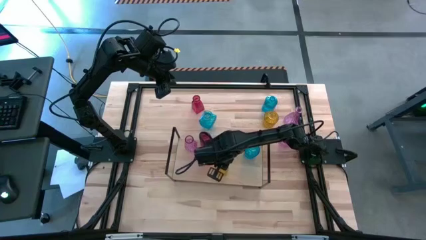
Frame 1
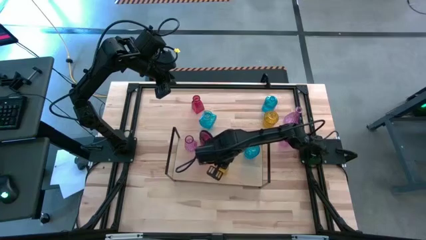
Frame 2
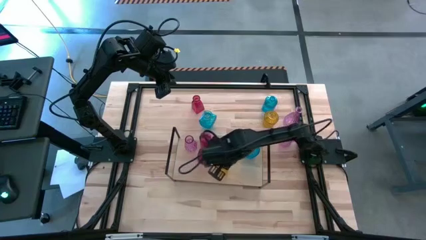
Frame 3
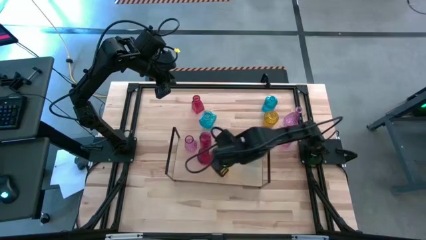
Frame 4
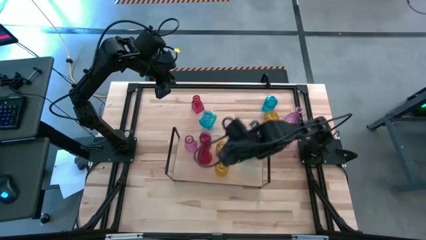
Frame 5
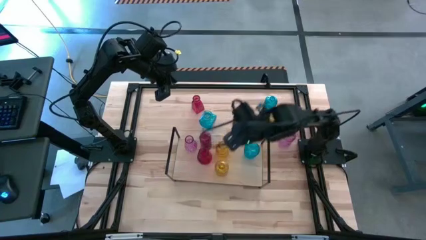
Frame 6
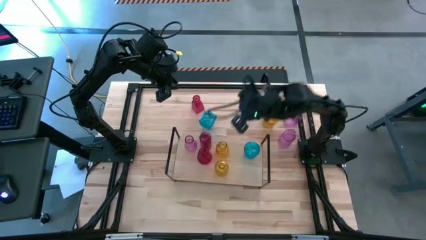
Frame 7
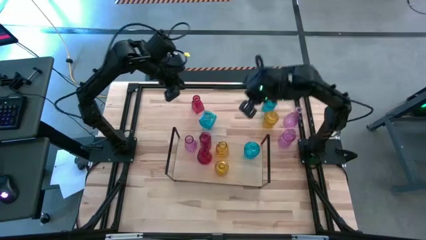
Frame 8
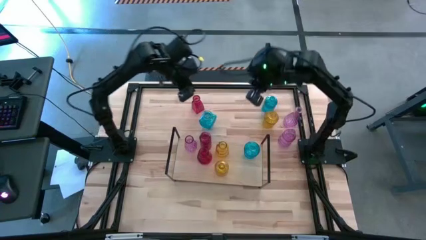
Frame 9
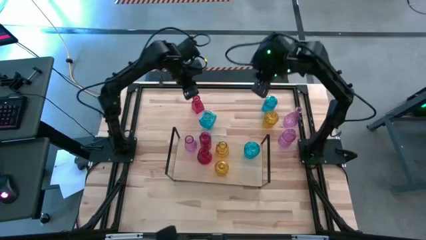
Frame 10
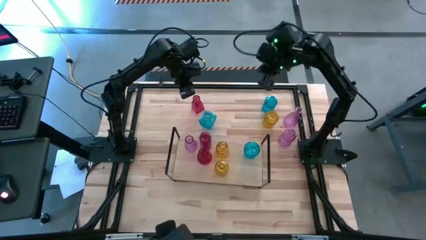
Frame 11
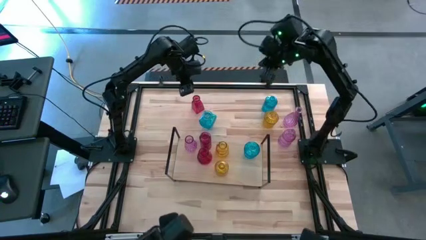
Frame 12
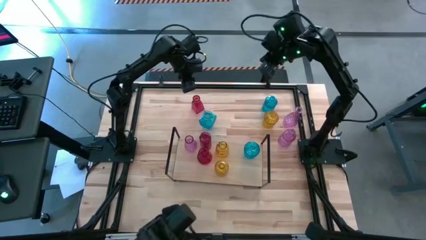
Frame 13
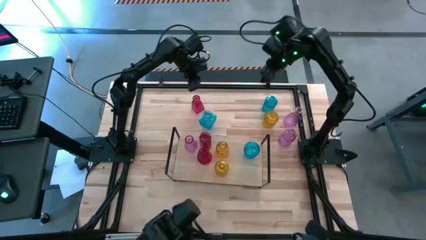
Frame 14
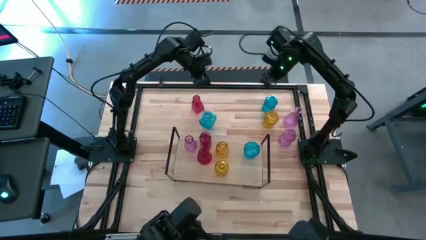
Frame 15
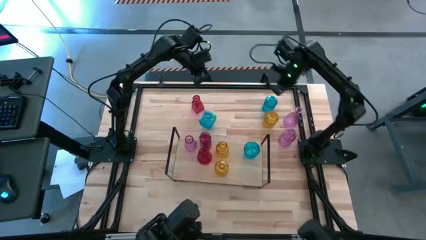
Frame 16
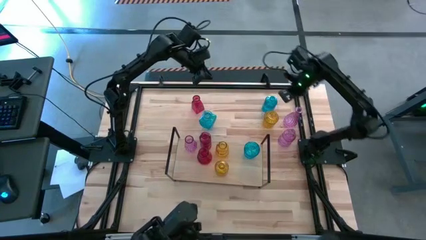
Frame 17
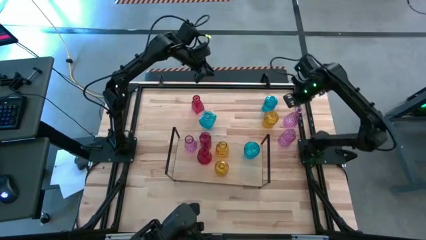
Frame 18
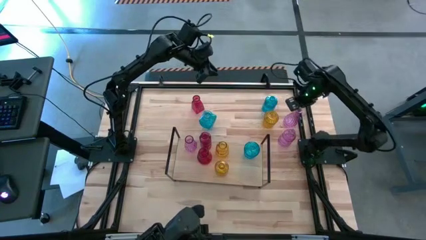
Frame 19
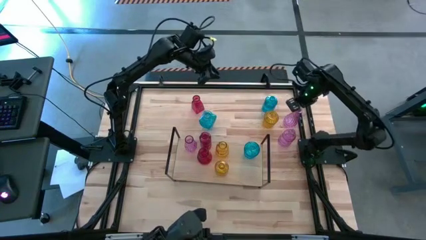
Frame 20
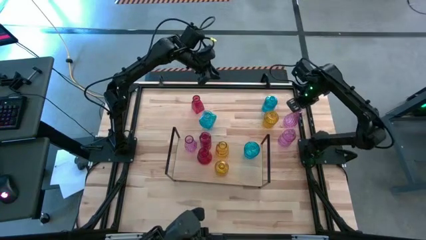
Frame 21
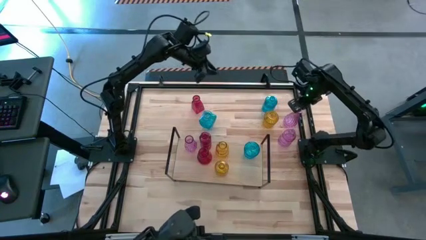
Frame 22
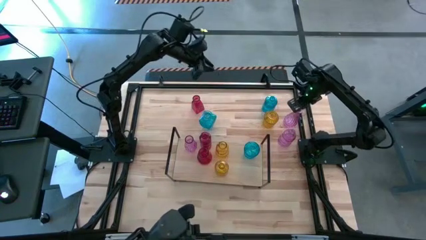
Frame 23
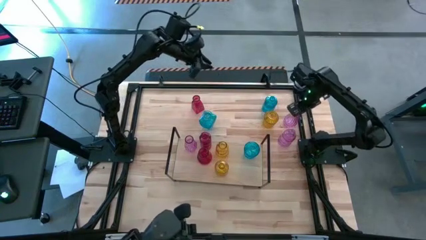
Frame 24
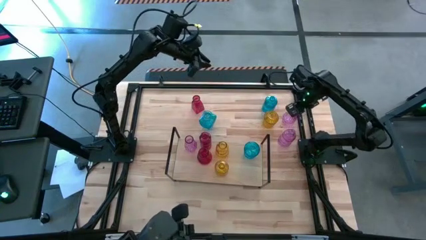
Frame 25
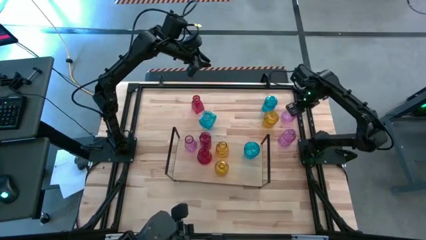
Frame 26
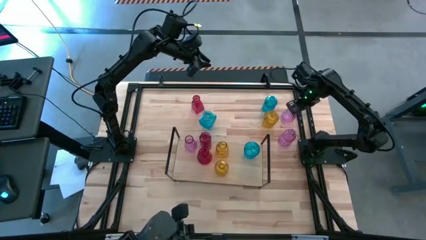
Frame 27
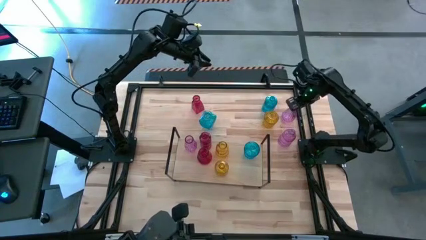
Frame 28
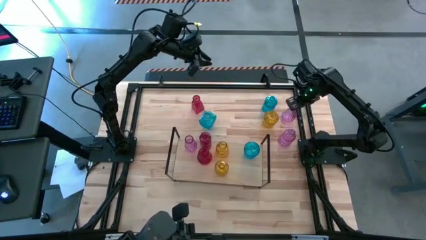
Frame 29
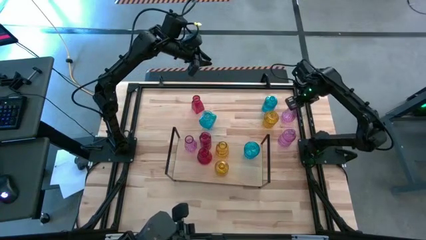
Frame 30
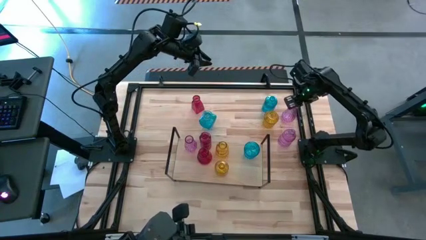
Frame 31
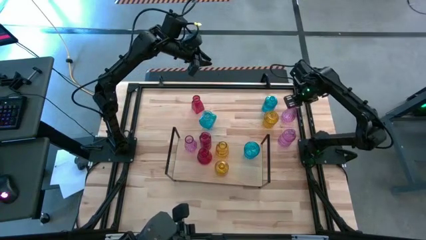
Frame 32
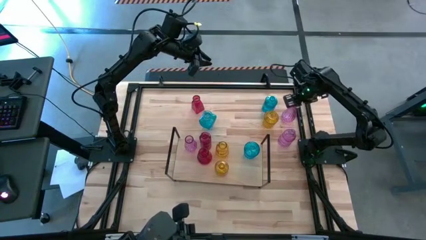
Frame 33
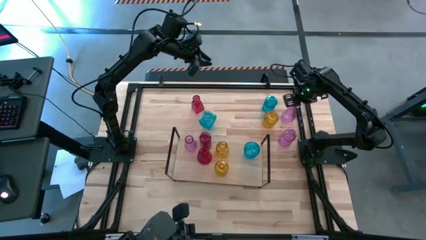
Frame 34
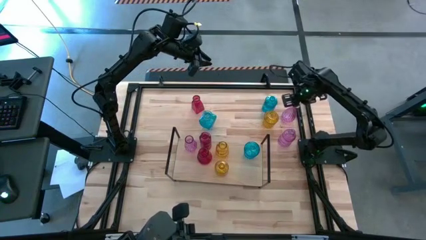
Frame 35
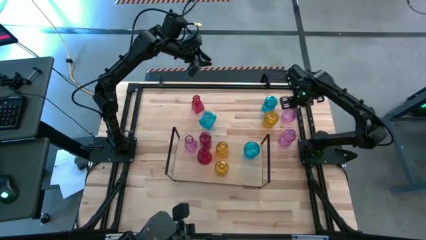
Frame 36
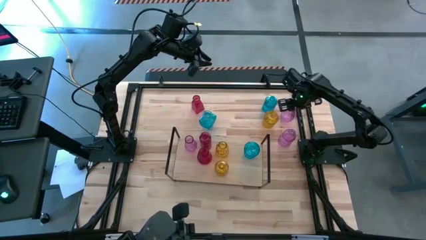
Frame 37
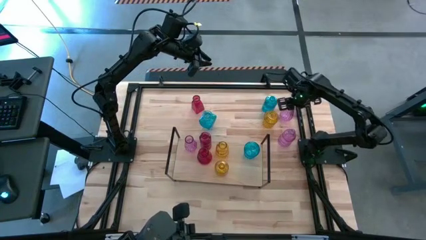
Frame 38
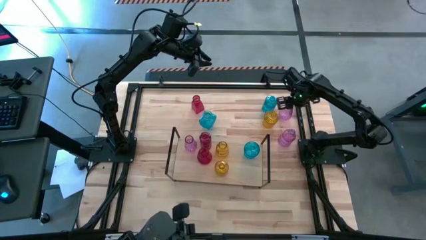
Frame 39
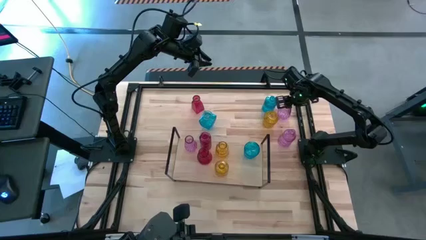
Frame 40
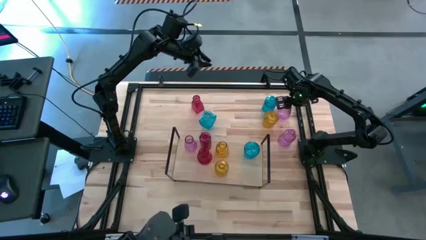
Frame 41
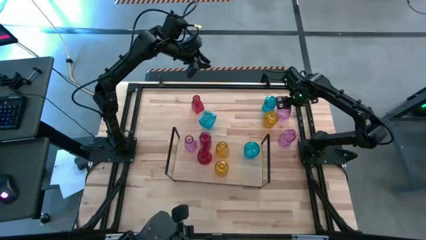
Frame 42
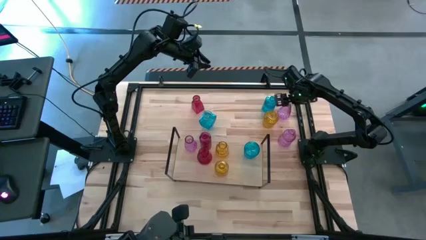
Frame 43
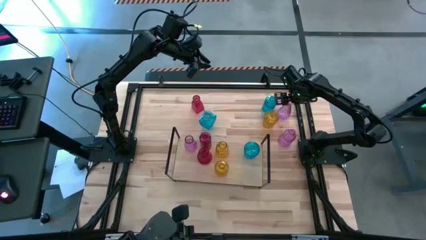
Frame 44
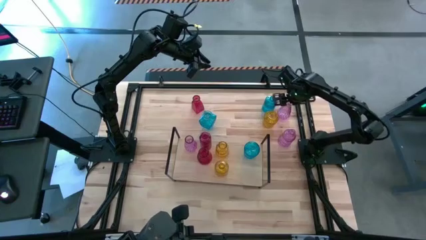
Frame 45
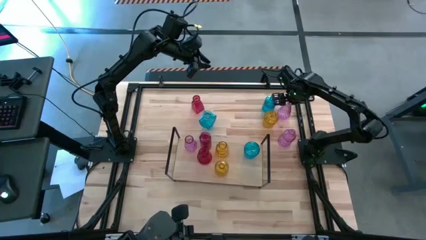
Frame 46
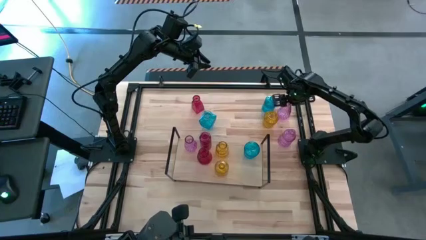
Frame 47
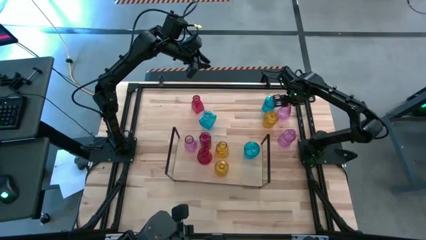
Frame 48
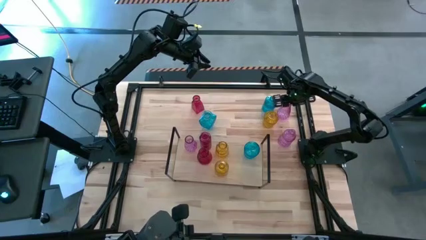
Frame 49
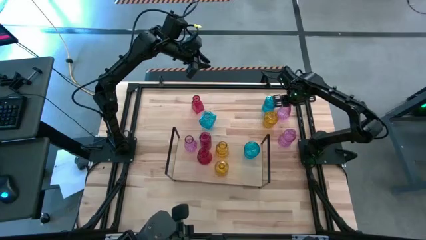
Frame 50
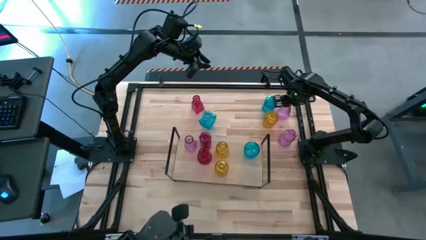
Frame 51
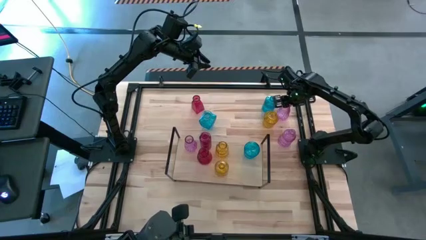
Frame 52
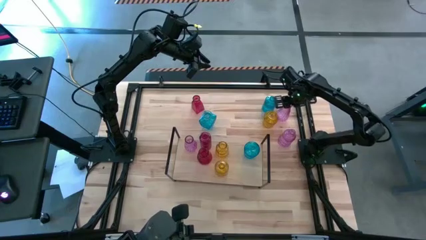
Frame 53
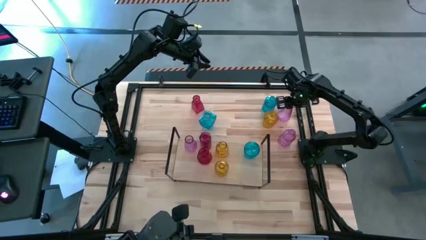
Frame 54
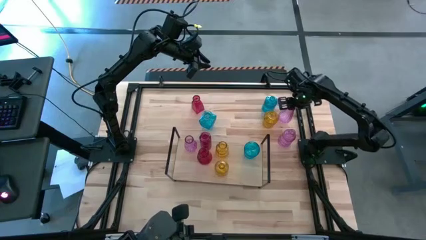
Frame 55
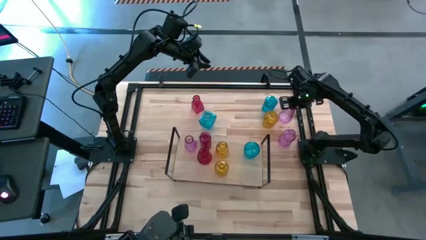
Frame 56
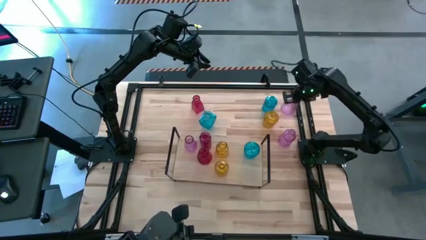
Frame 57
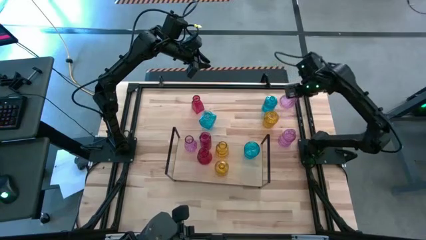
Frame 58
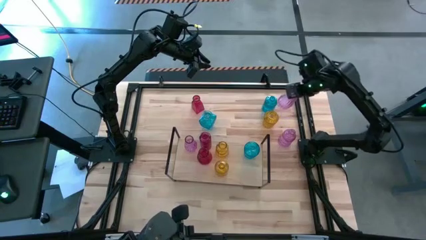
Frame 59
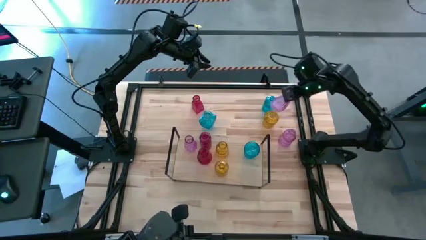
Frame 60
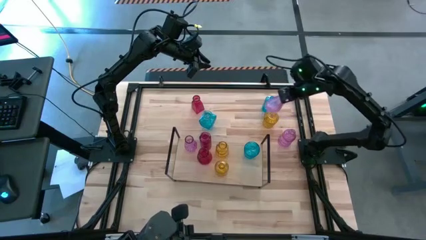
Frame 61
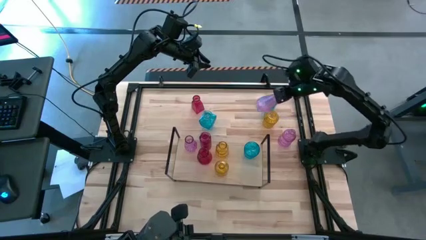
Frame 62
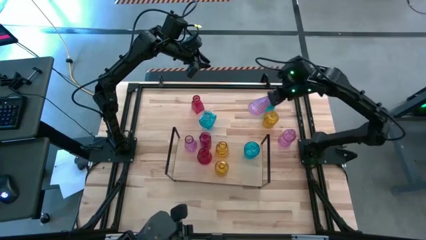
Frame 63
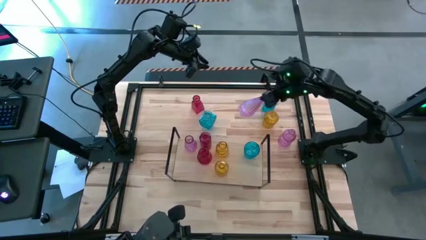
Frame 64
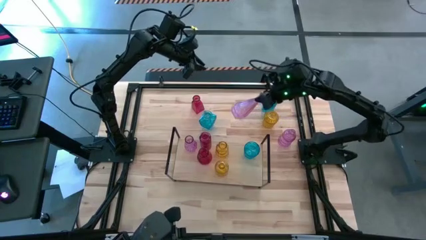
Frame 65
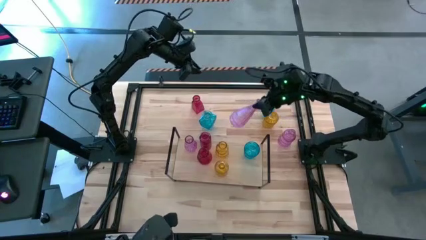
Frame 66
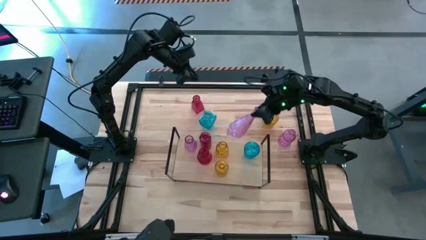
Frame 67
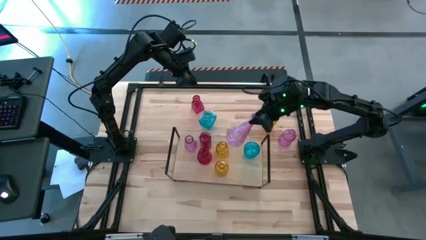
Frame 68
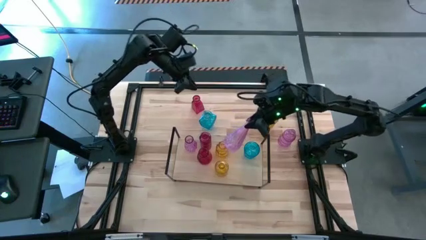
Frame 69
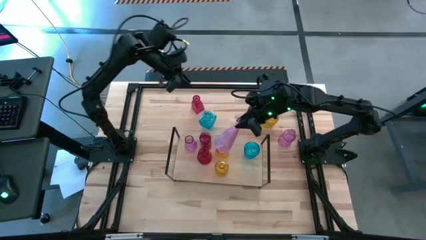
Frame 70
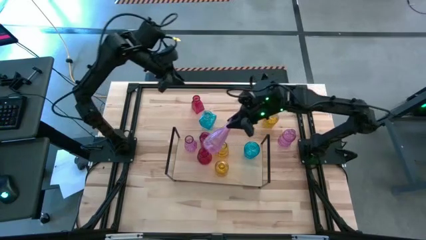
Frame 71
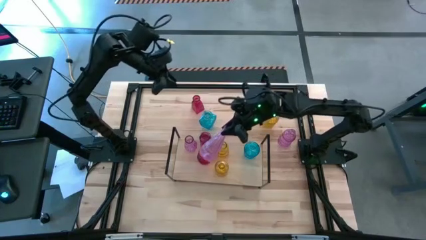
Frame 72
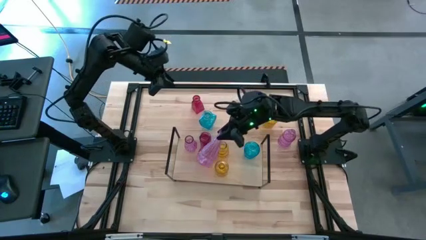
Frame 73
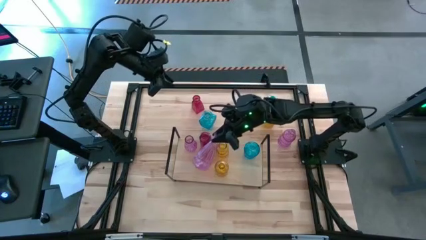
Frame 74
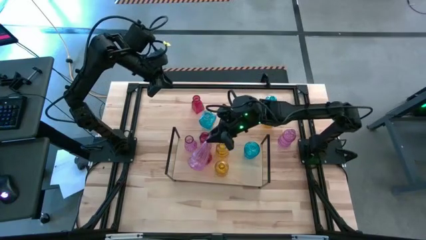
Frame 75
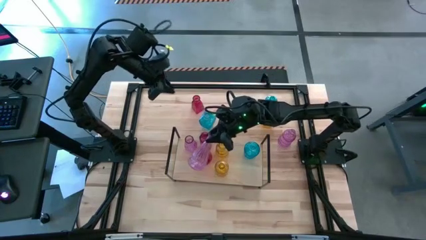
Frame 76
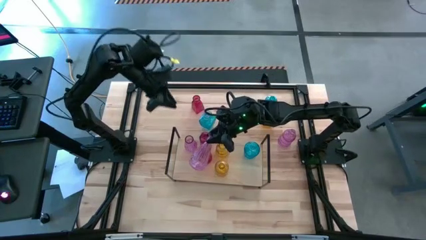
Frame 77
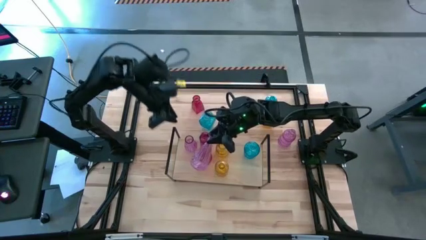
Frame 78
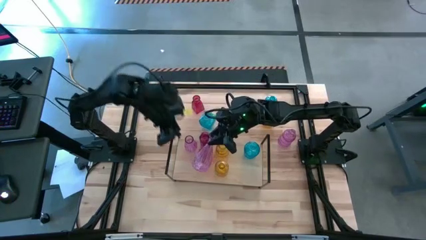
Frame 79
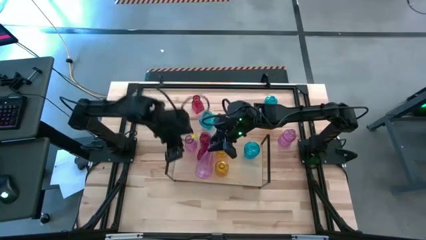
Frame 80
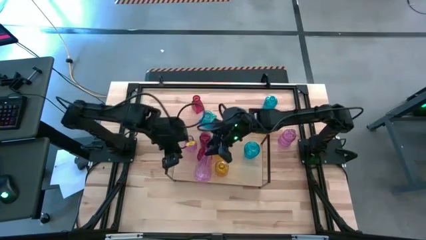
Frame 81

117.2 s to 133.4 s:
Task: sort vases onto shelf
Put the top violet vase on the shelf aligned with the other violet vase
